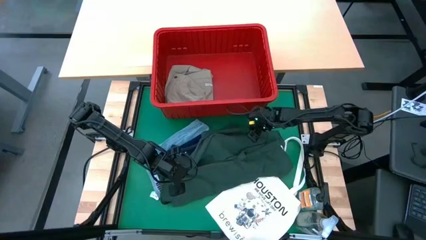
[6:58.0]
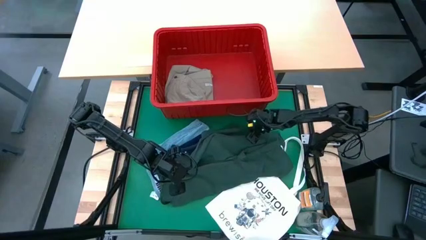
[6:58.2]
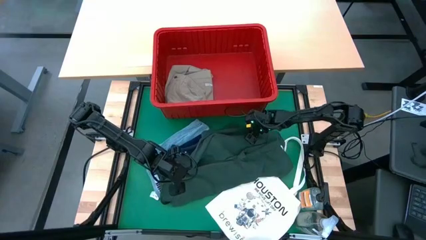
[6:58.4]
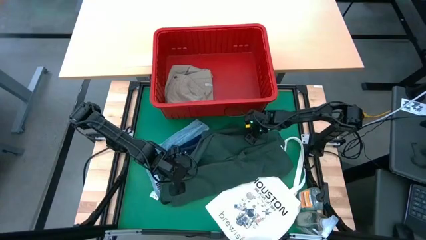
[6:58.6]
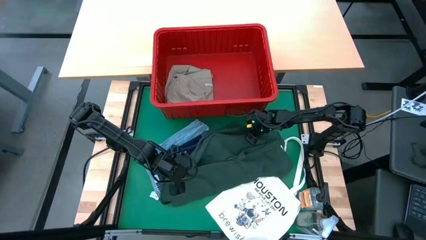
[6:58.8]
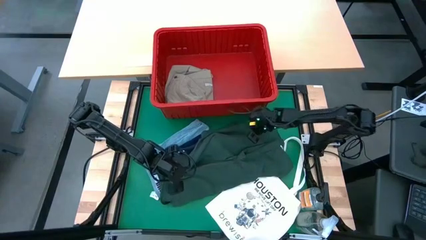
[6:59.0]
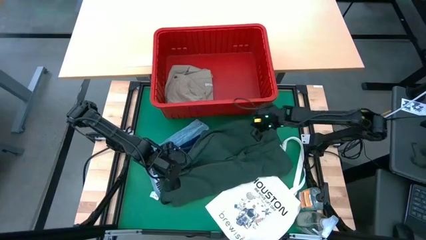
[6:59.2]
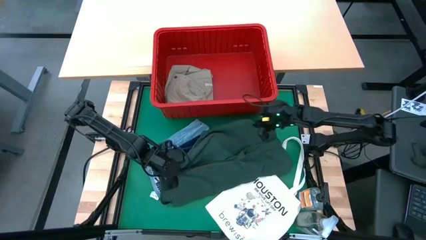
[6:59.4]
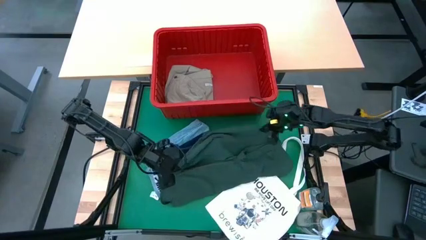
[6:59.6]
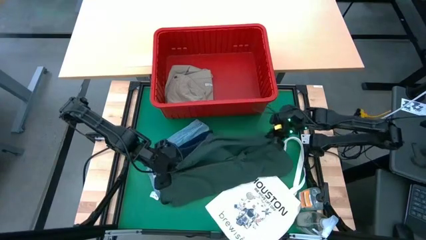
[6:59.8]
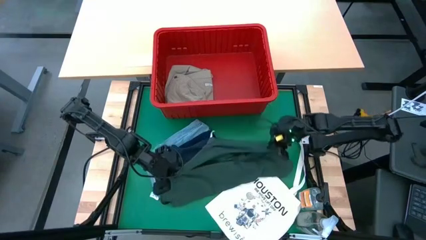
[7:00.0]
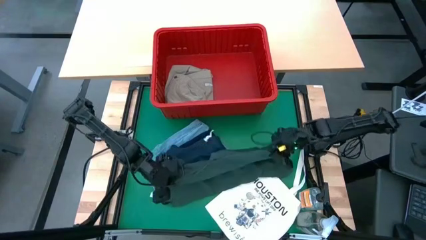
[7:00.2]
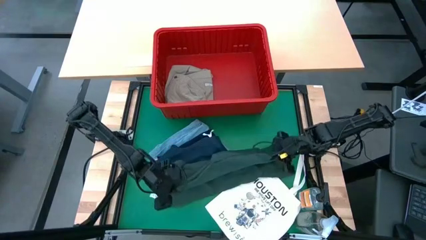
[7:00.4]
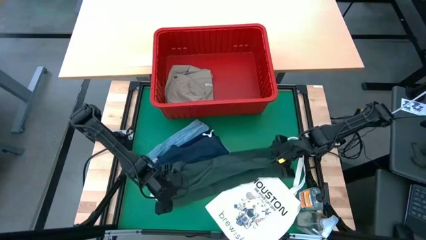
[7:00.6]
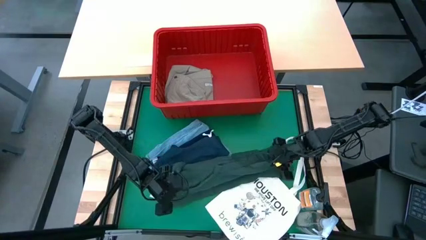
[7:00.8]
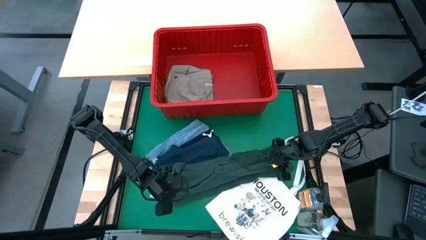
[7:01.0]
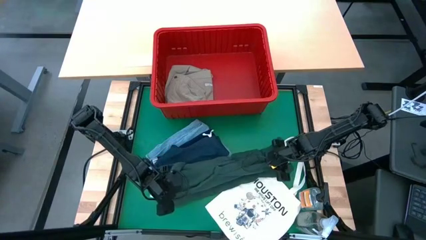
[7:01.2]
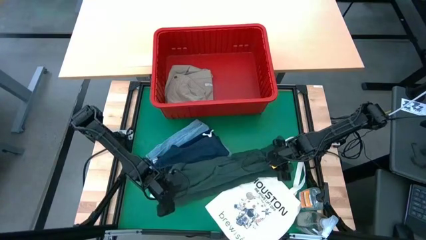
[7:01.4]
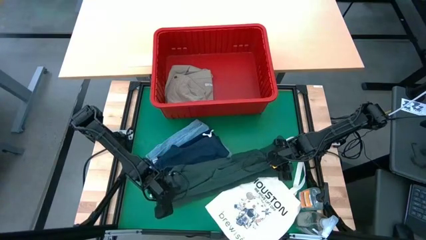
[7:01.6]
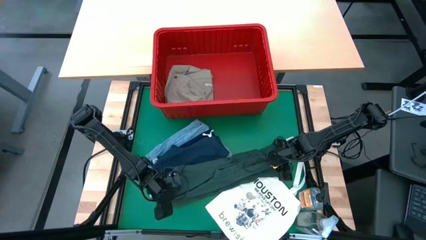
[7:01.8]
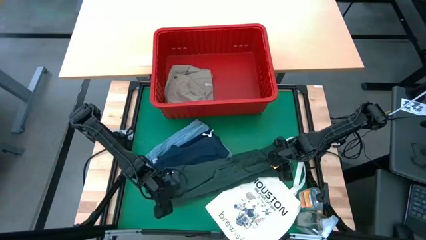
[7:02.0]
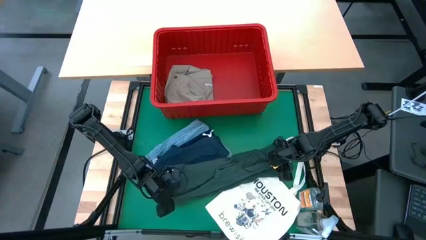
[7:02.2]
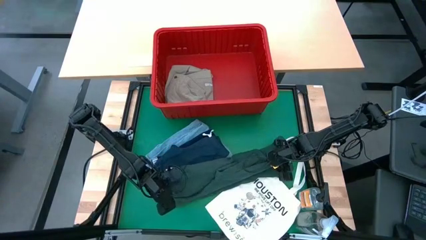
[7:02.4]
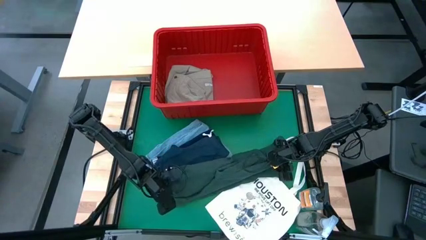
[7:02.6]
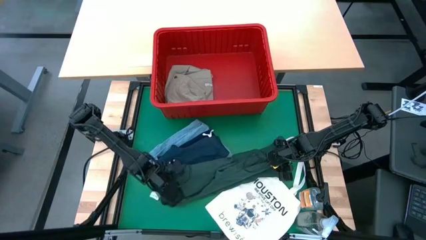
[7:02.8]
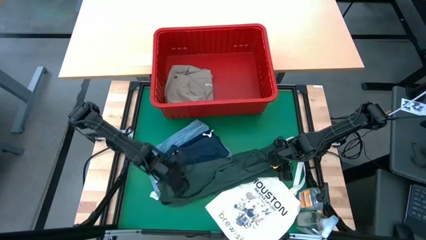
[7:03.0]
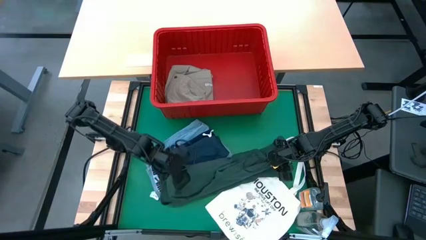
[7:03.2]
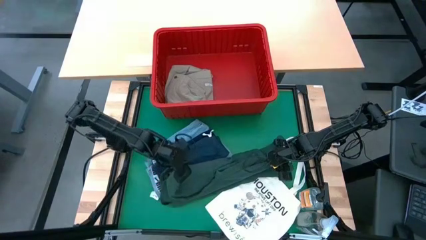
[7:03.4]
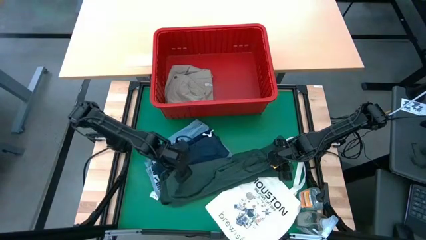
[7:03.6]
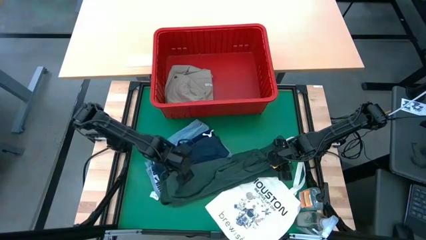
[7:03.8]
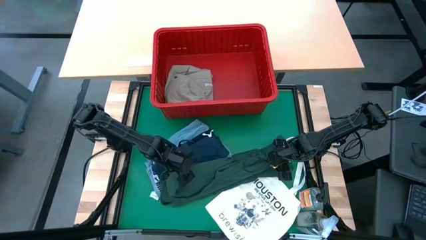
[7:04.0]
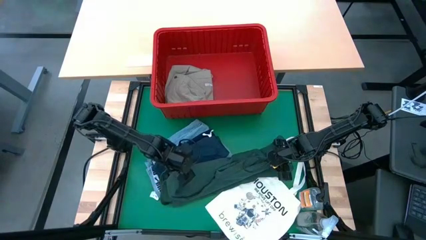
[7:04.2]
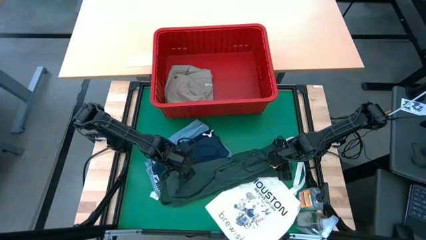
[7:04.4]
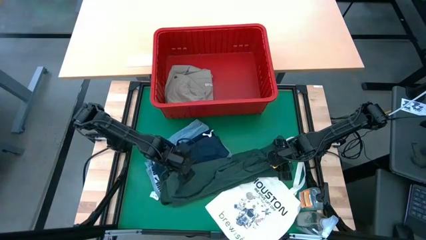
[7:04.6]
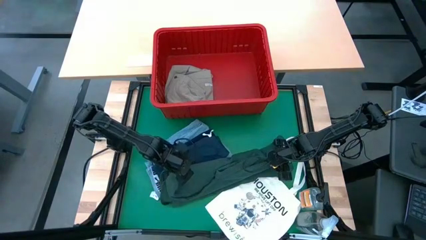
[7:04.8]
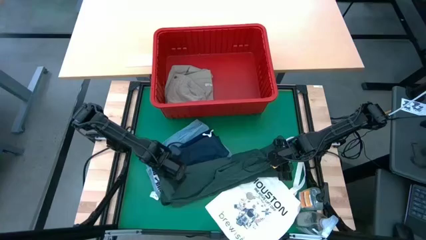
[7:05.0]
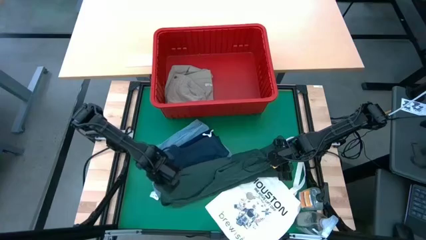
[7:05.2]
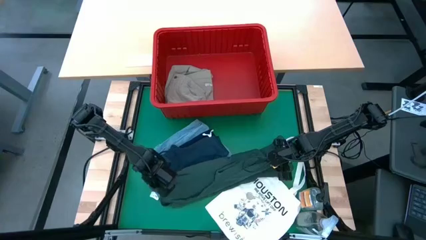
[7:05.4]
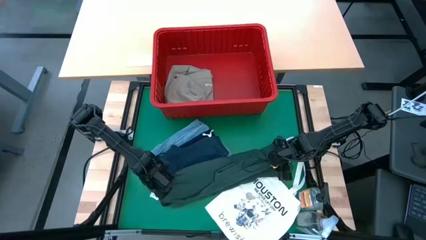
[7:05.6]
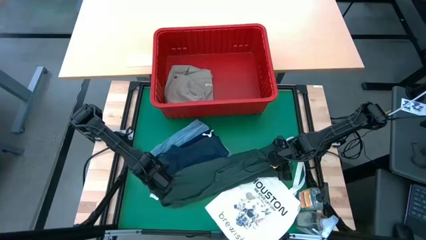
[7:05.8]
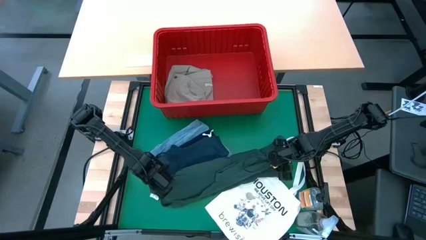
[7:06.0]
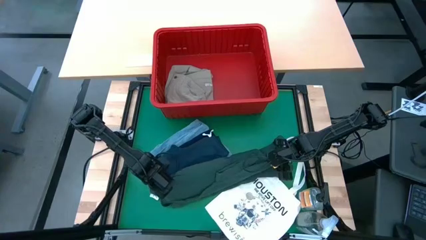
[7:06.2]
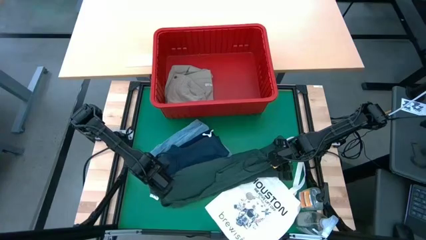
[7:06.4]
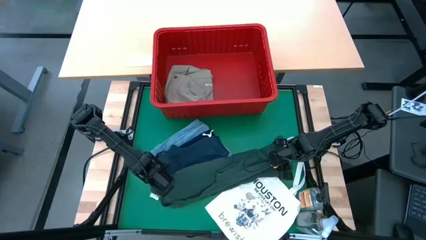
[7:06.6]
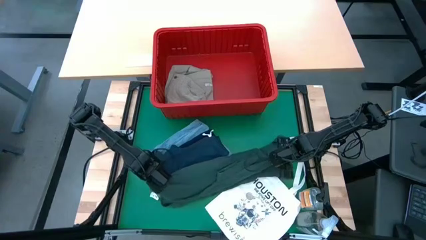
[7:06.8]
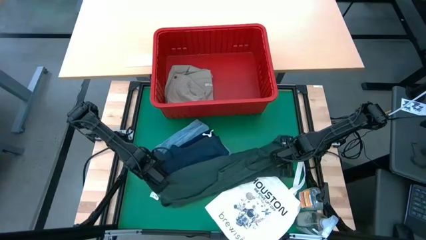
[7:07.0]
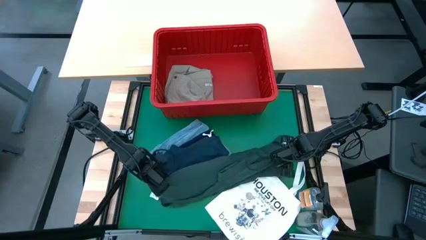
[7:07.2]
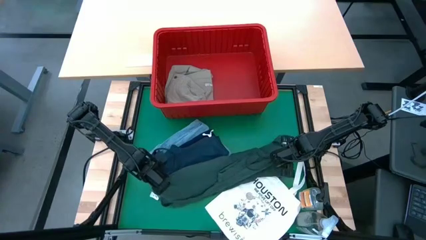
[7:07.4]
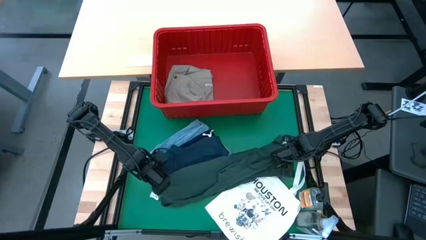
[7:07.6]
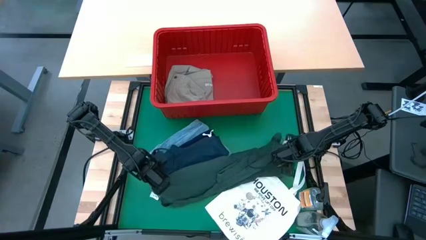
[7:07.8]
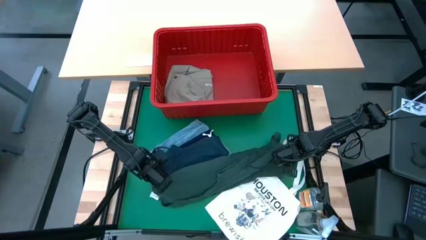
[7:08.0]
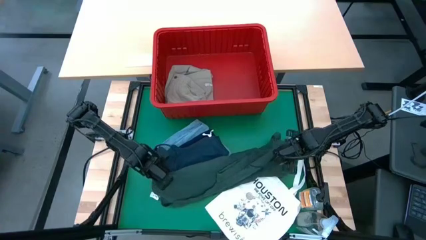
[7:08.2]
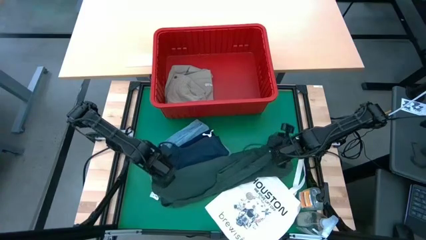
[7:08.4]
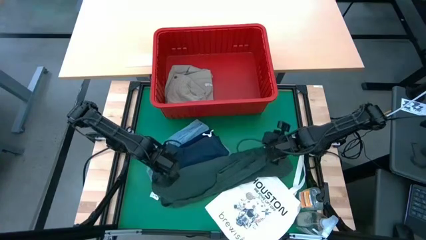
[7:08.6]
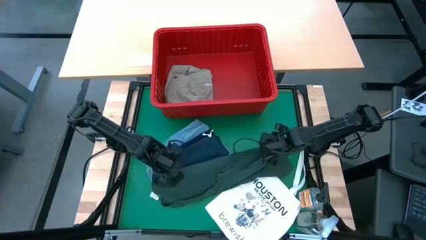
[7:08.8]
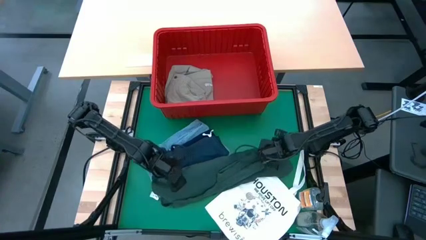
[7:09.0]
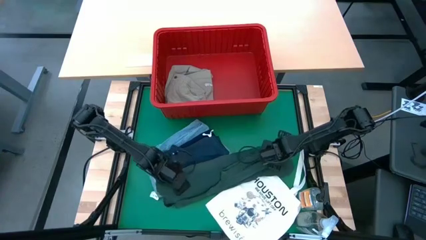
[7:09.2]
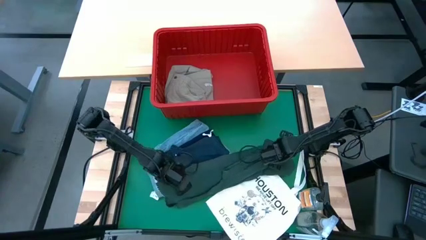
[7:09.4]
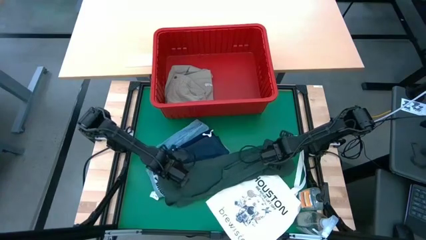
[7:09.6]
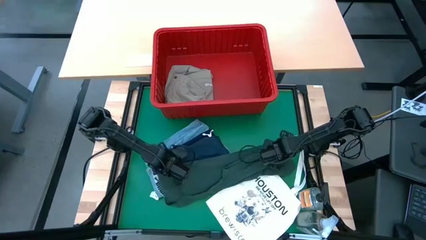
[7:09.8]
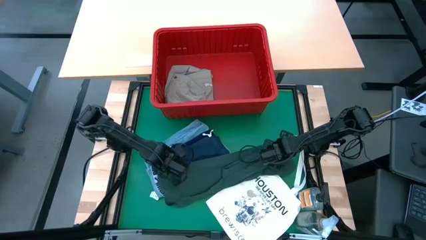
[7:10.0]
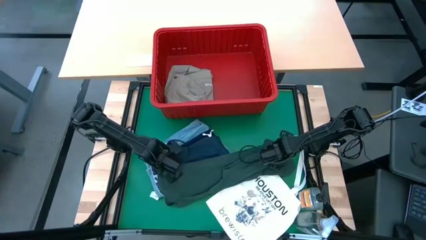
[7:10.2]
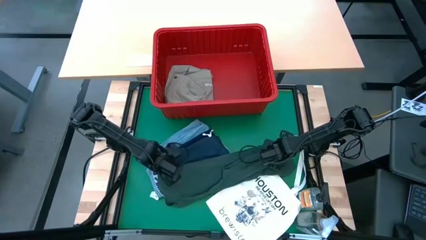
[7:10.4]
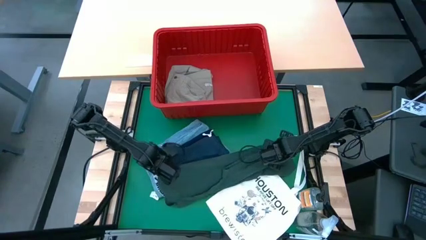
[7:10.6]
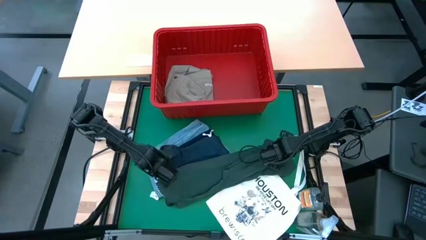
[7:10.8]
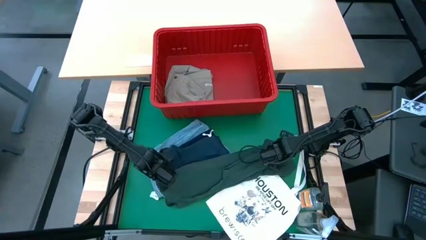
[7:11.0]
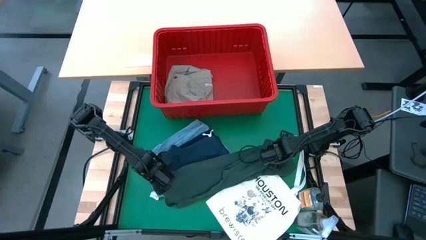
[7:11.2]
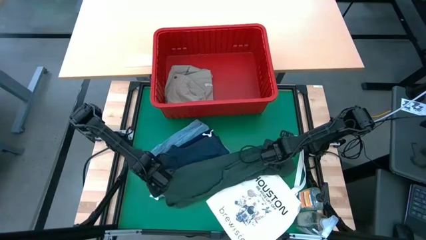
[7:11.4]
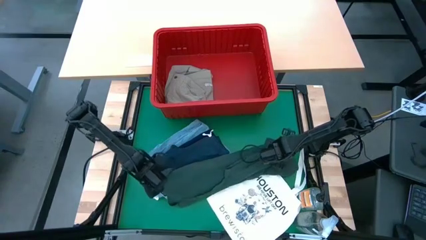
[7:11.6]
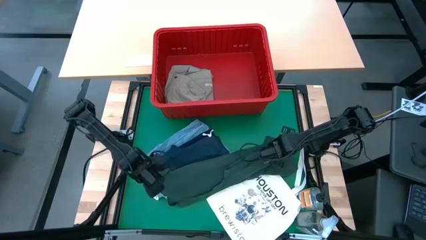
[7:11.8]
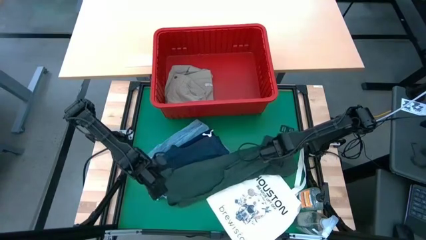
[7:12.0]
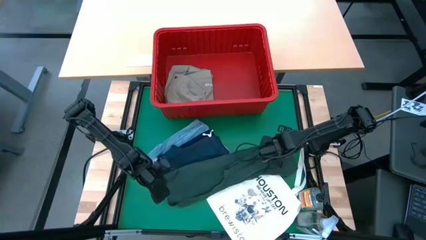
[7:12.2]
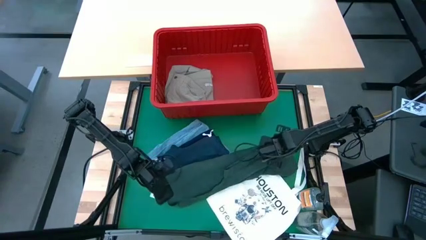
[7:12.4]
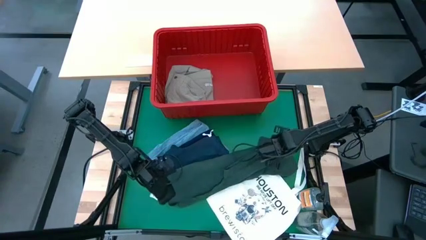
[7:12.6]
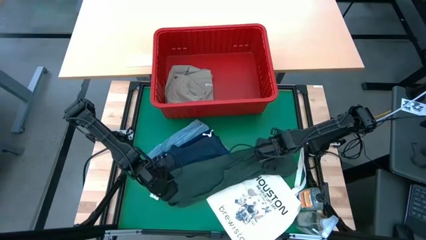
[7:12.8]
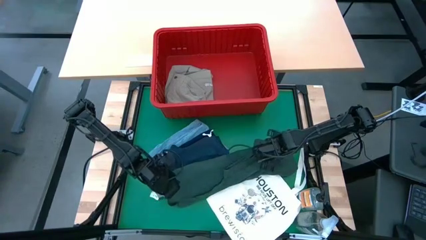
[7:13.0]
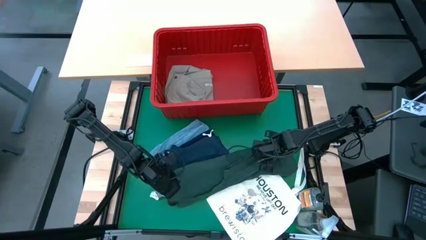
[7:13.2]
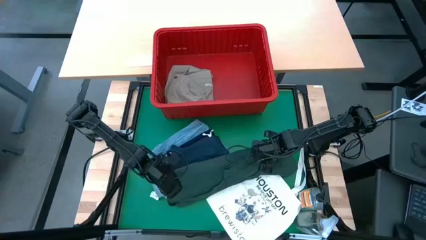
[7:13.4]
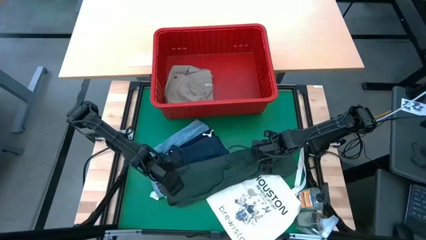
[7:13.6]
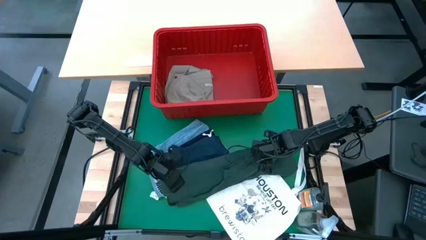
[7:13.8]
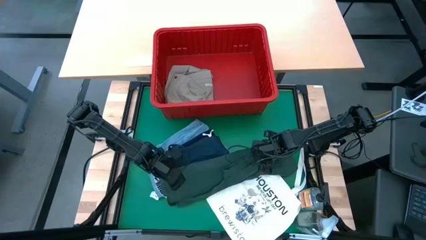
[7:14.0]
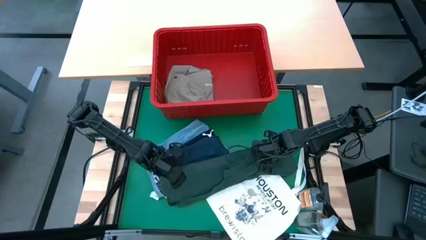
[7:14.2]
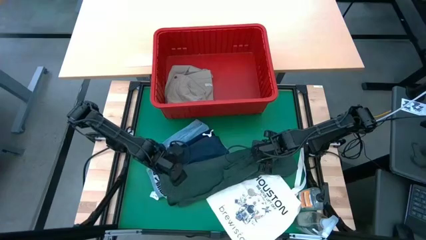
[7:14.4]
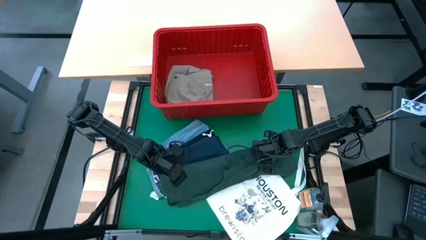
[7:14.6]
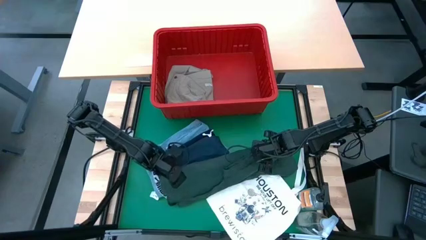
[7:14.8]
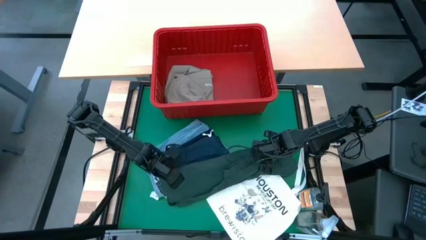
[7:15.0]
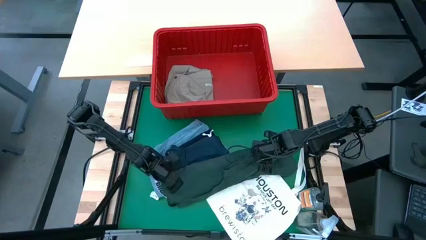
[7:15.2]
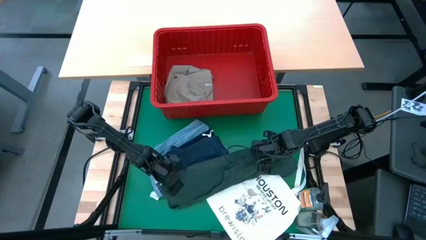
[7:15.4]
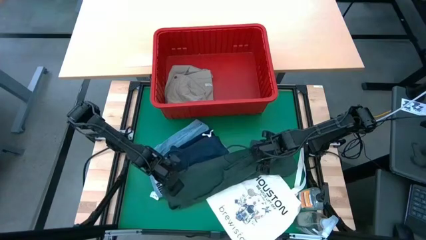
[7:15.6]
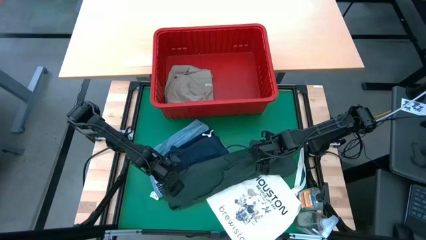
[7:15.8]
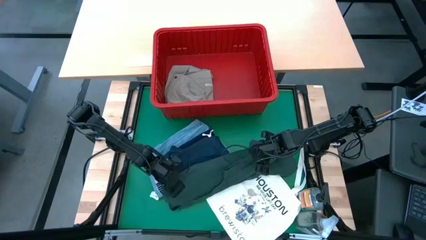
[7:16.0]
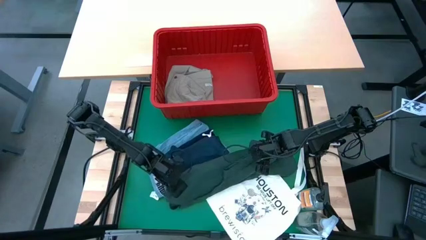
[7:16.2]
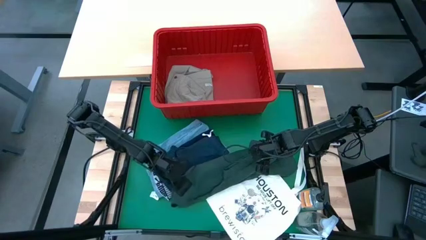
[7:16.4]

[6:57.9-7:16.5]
Task: Fold Laundry from Bin
Fold the dark green polo shirt
